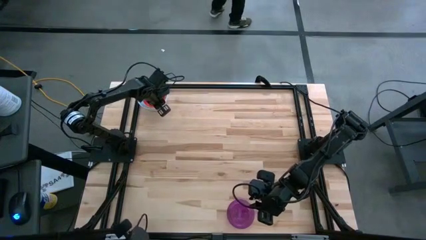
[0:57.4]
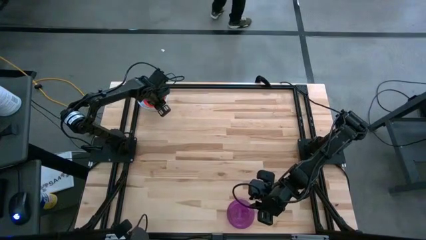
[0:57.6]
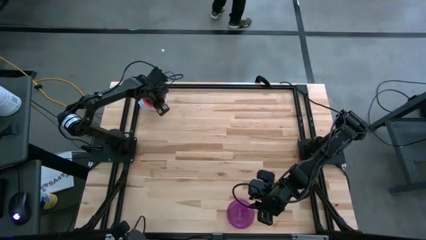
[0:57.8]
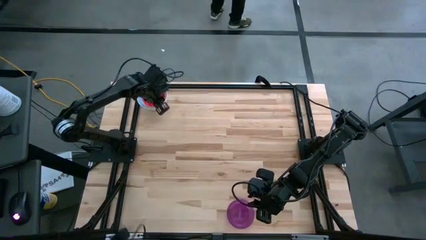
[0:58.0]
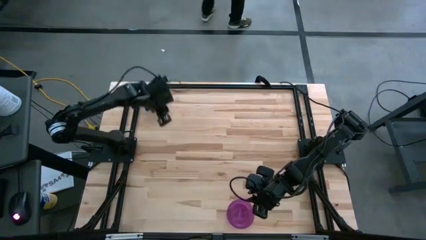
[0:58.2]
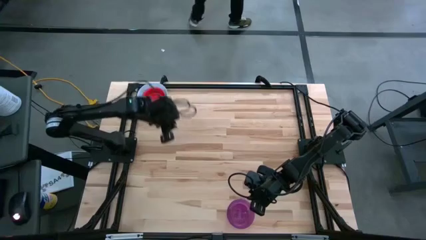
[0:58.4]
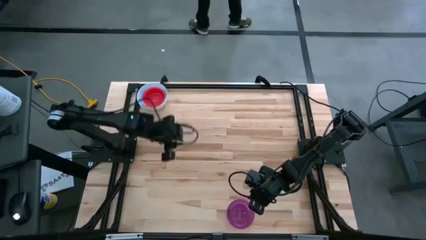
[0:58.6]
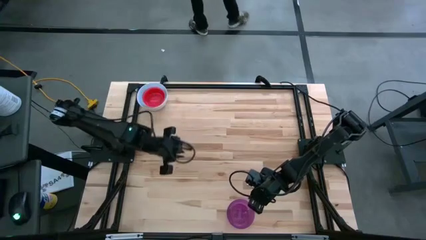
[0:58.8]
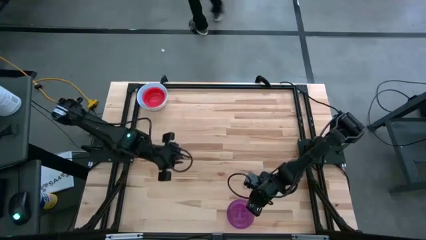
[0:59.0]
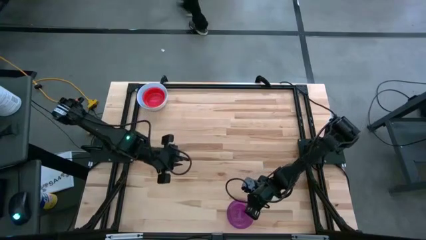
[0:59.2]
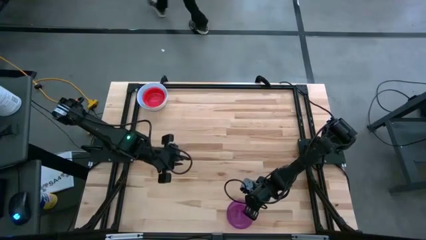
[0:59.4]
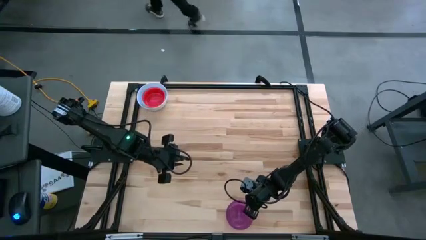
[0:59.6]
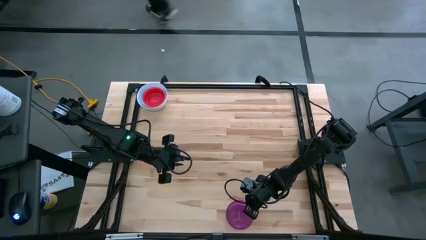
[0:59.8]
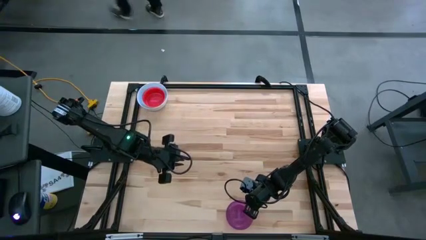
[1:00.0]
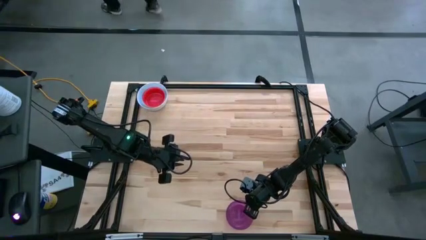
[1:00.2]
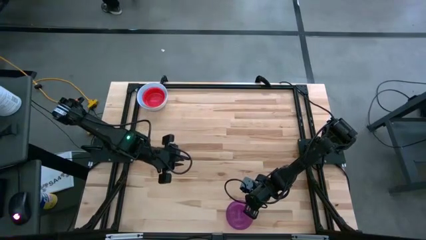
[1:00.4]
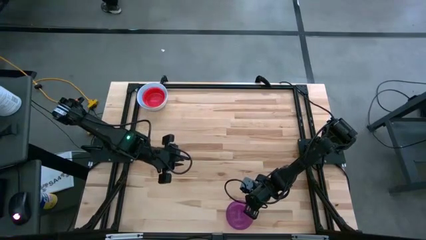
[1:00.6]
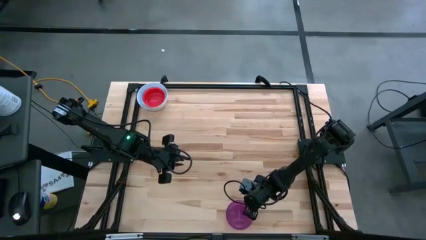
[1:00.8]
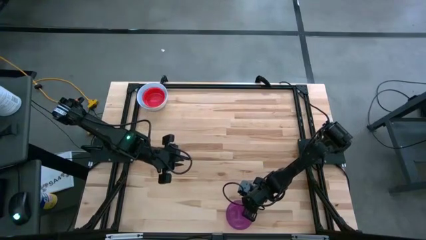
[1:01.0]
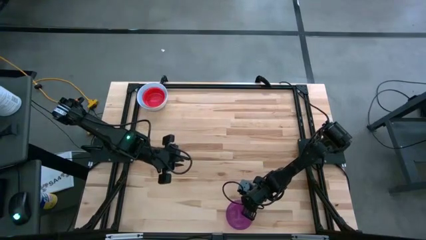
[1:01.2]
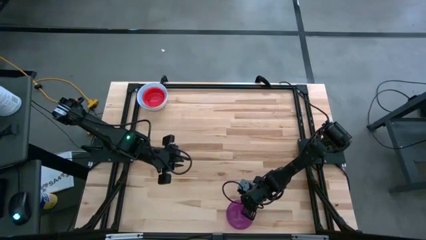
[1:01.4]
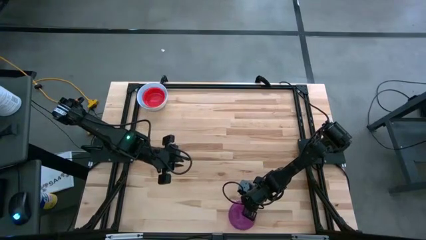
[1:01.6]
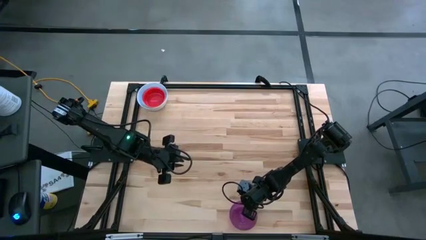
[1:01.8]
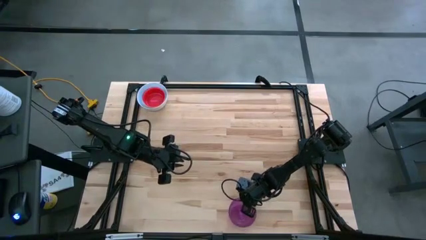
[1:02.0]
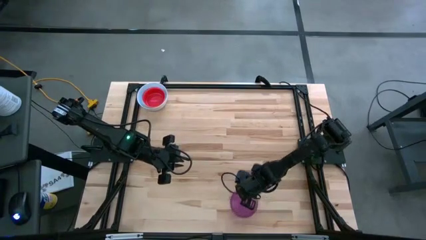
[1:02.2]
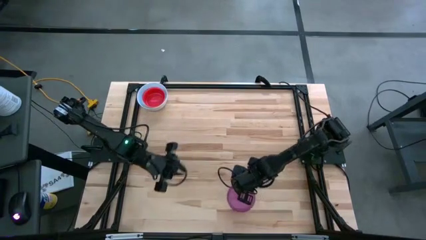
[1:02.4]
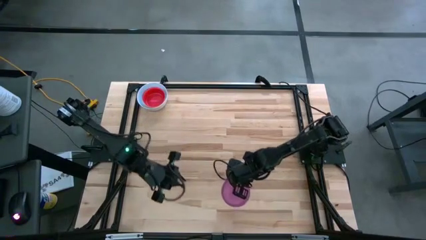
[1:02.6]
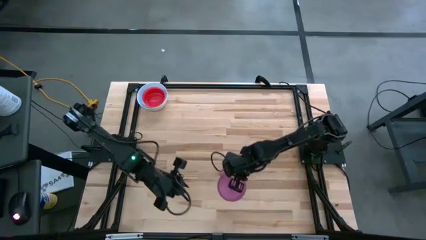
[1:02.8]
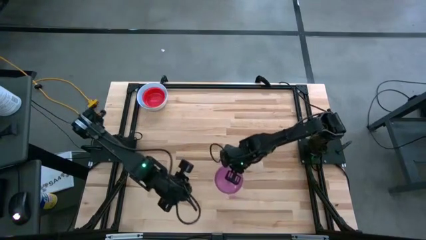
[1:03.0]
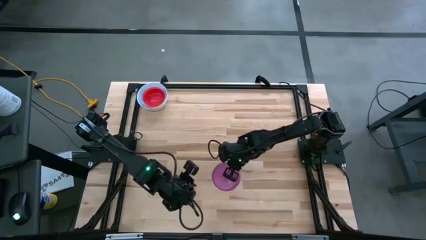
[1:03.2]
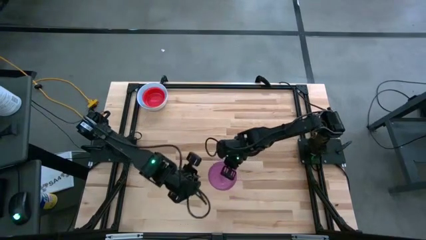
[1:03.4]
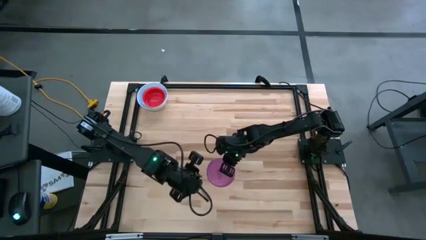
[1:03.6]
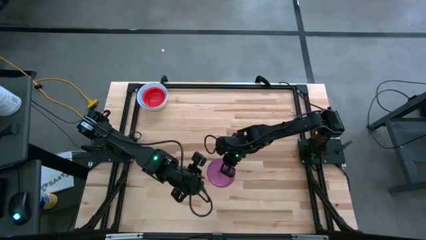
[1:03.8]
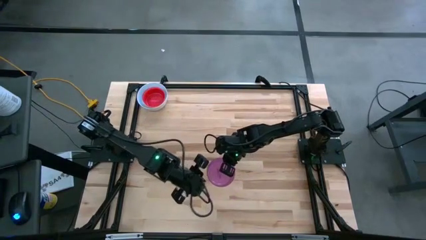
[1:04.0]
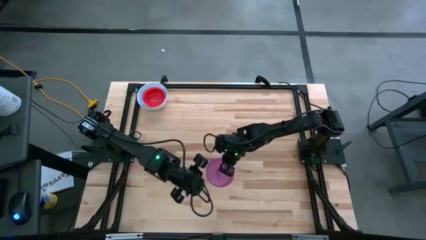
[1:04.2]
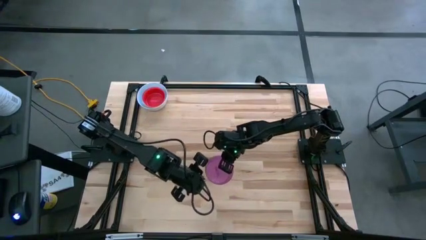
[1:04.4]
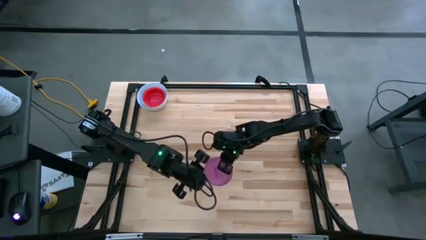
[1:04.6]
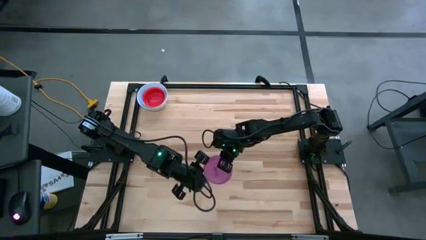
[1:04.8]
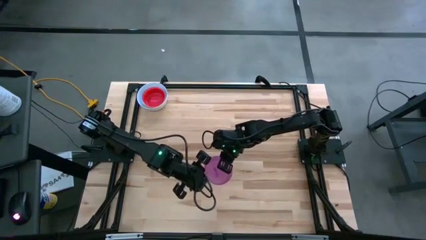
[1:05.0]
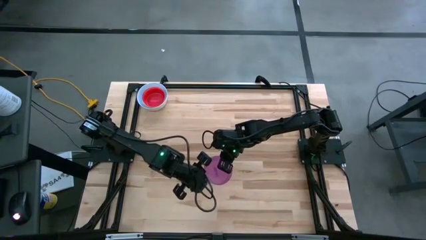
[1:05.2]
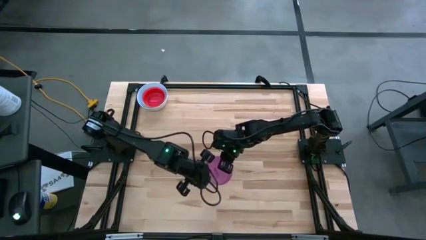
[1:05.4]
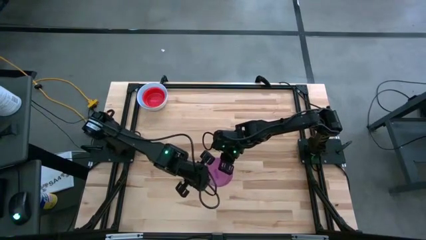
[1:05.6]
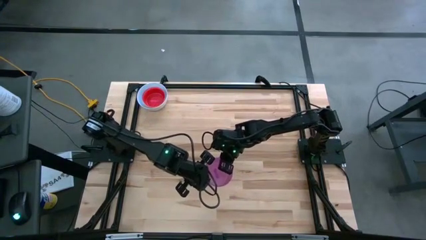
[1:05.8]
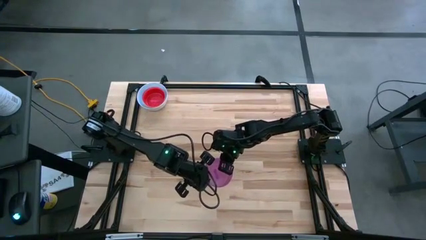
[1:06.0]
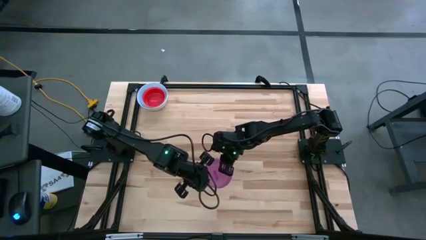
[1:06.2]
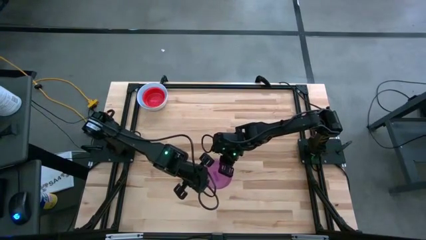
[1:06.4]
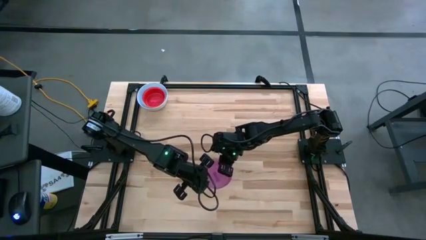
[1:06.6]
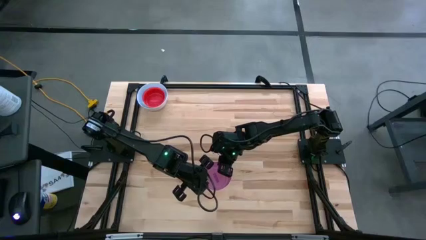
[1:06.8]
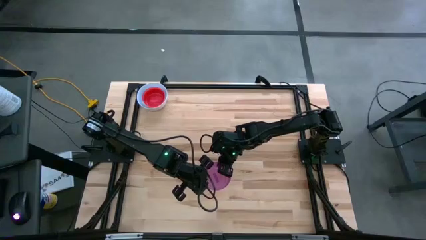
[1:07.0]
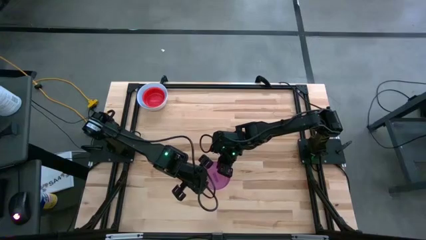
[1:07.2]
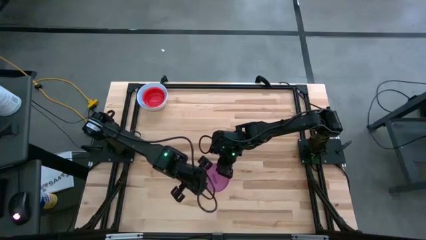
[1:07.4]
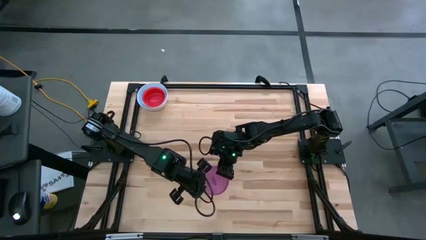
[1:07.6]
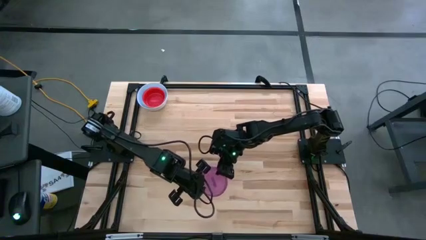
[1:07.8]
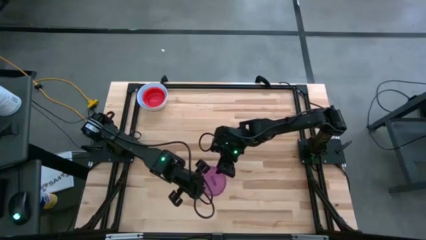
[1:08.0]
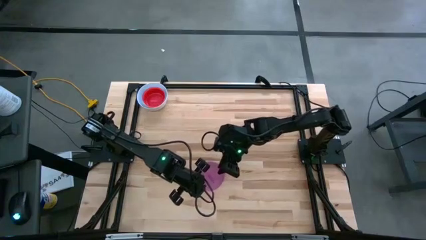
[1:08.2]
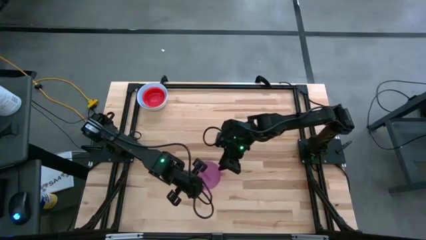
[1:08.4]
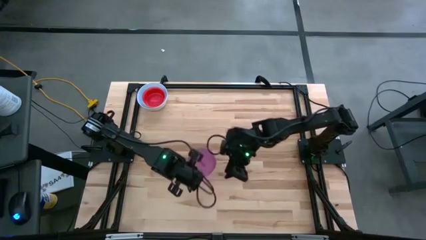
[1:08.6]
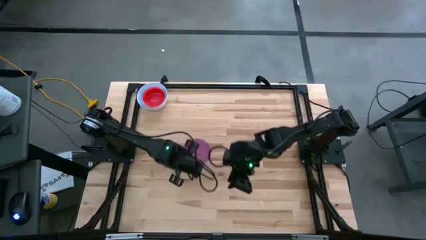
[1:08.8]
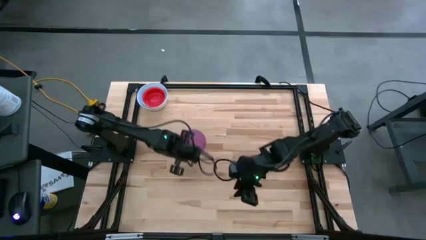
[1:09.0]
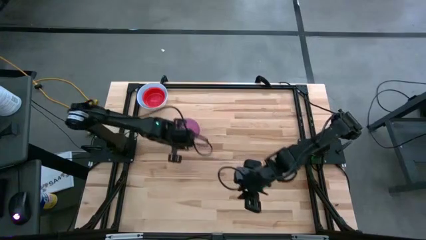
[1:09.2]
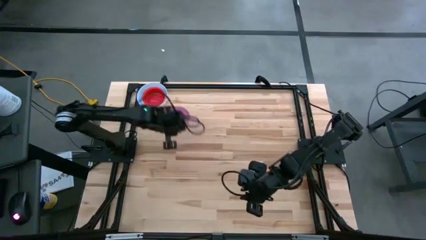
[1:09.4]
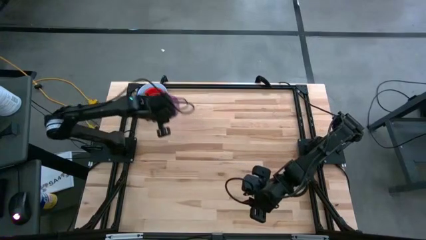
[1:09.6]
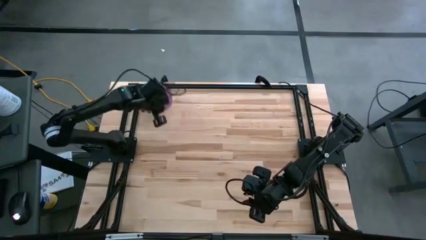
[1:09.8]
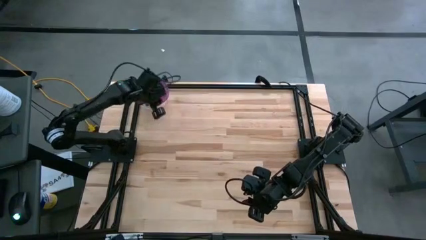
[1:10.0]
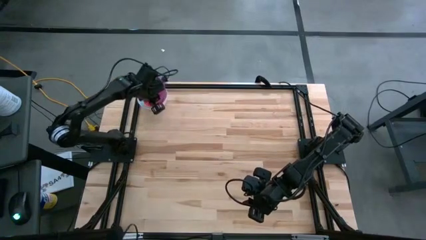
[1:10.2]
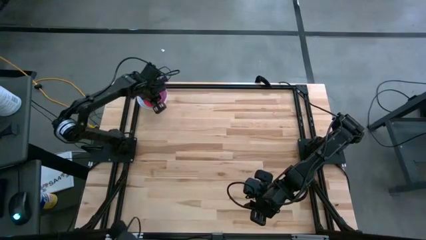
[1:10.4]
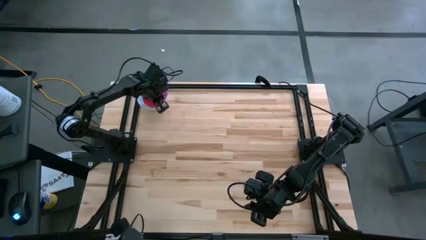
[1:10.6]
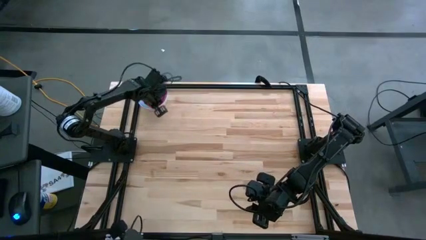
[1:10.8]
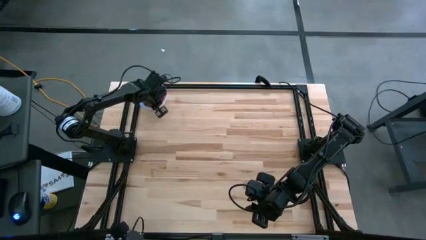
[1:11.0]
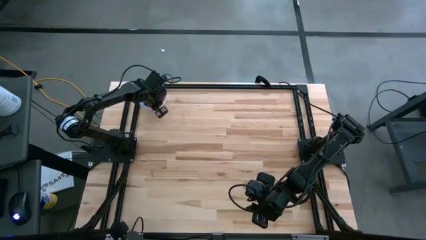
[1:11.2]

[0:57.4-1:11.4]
Stack the purple bowl on the red bowl

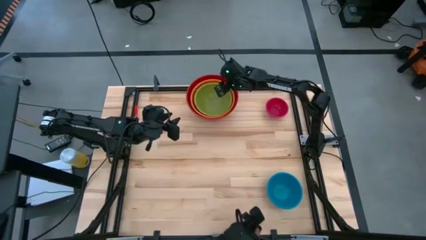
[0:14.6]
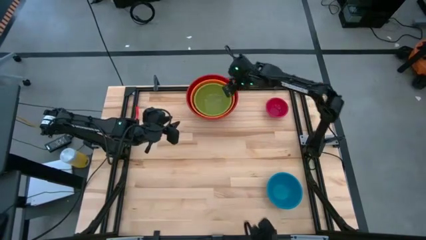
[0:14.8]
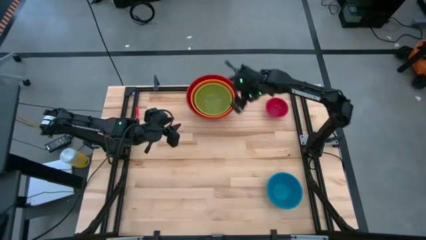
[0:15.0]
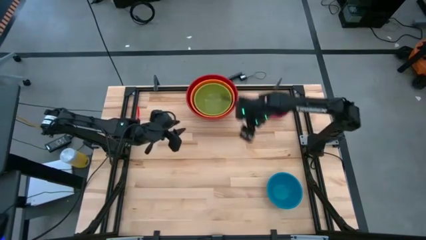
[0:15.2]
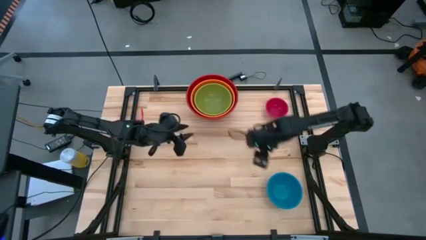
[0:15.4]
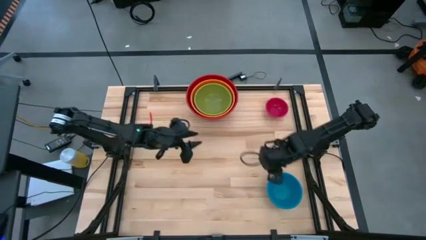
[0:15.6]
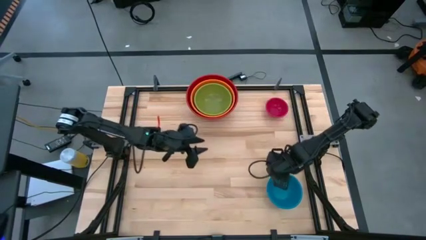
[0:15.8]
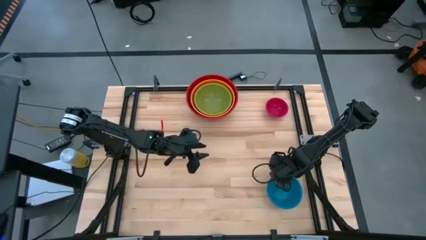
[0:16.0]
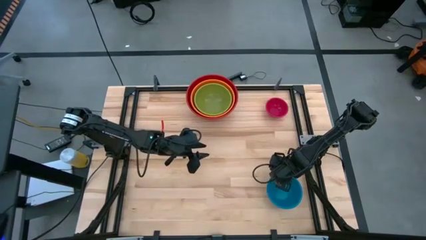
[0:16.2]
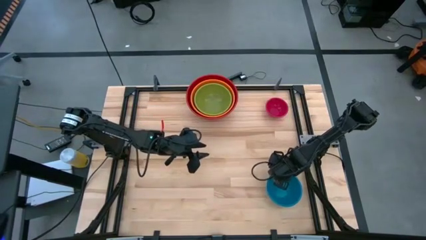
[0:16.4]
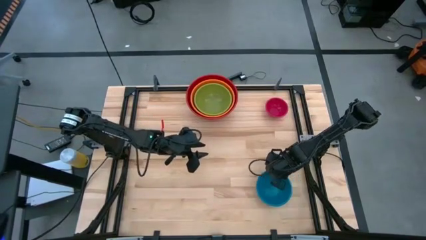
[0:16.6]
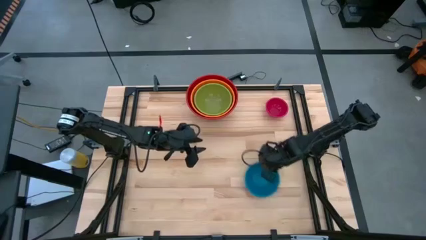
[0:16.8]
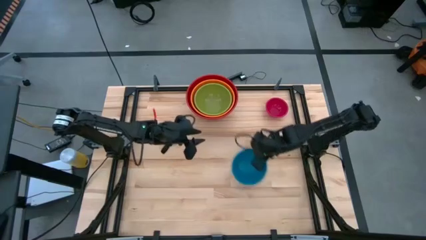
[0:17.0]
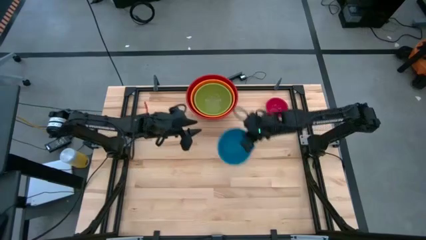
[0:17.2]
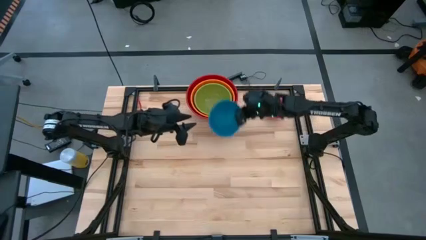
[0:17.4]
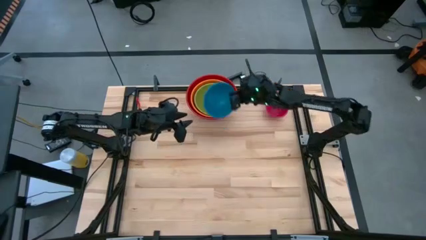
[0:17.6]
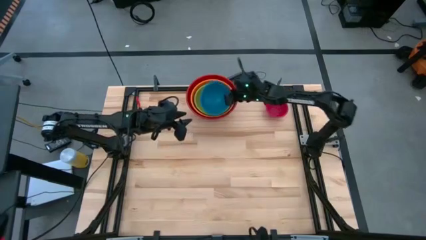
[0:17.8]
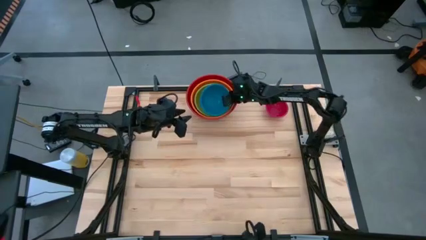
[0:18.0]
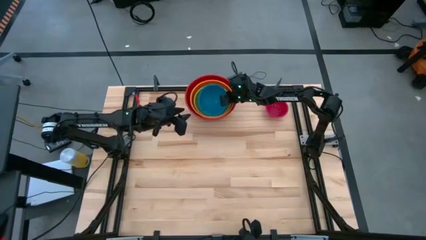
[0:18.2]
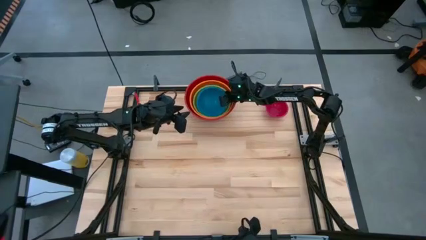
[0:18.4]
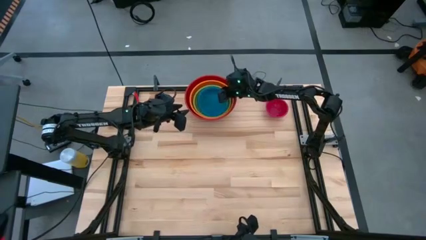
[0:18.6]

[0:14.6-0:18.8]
Stack the blue bowl on top of the green bowl
